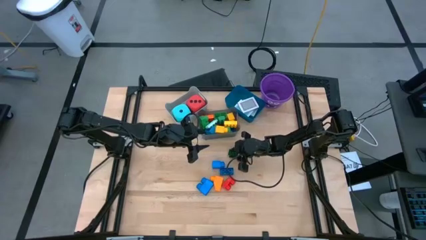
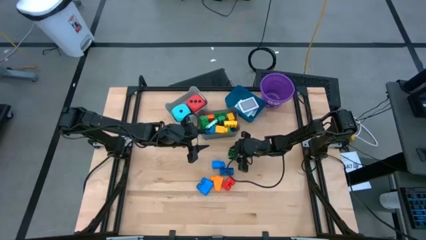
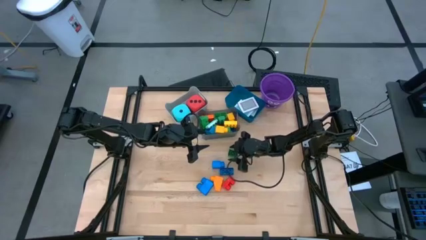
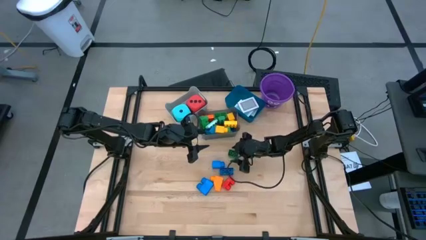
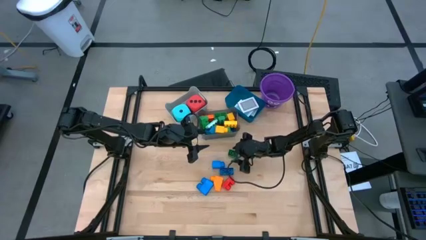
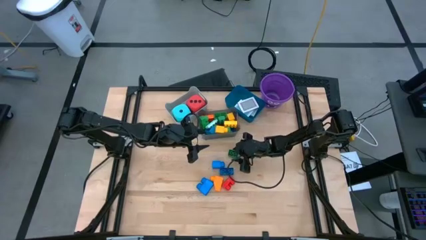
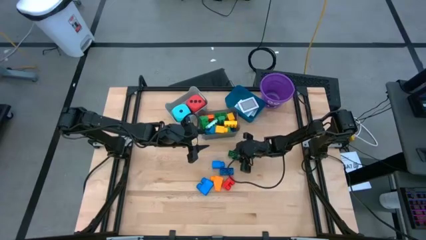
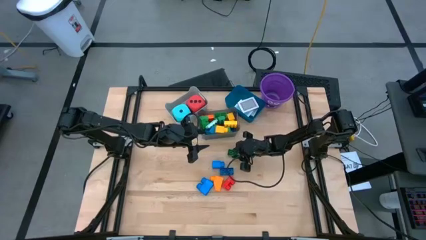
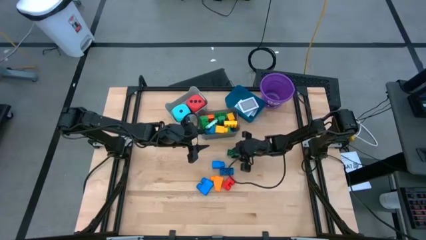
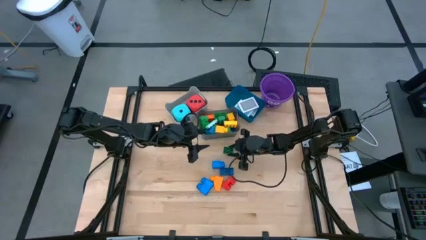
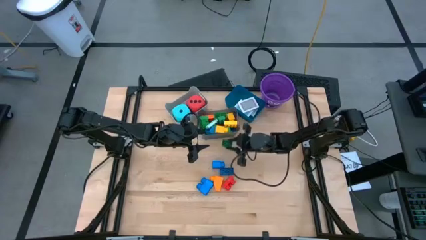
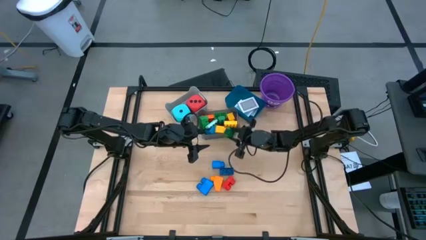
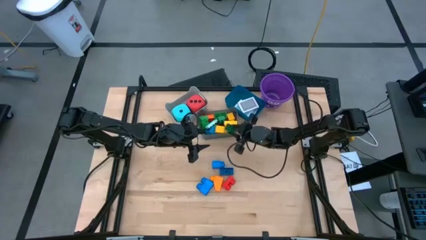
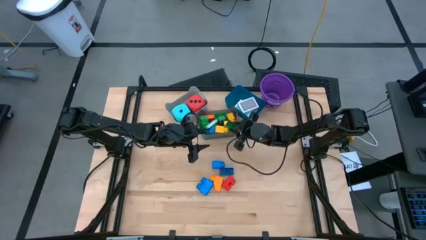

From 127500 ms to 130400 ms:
Task: Pick & Place Toys
Put the green block into the black bin

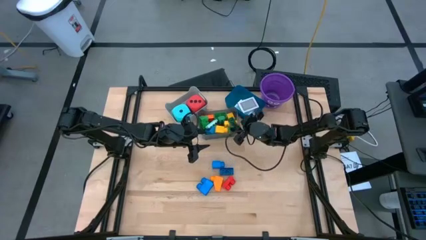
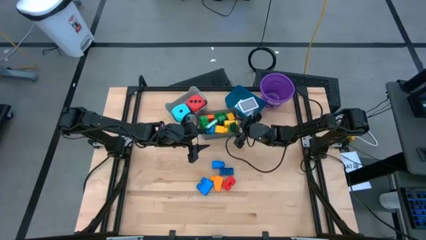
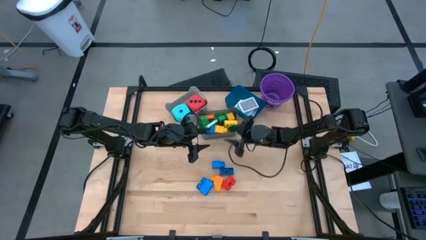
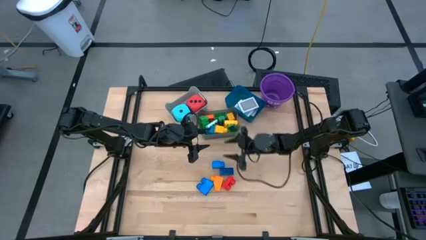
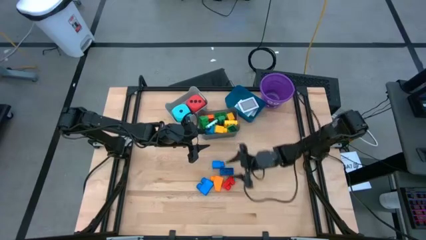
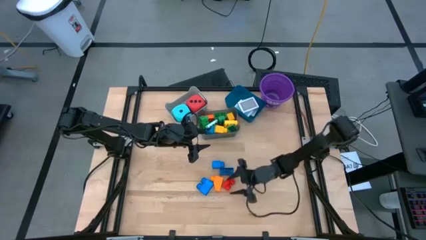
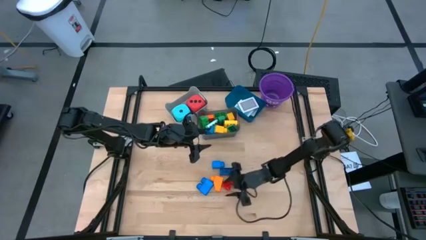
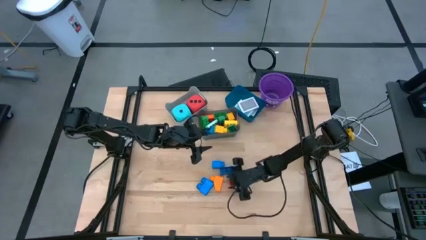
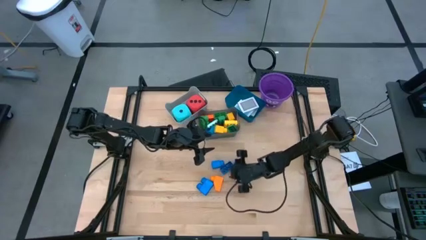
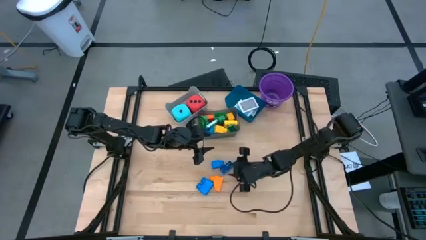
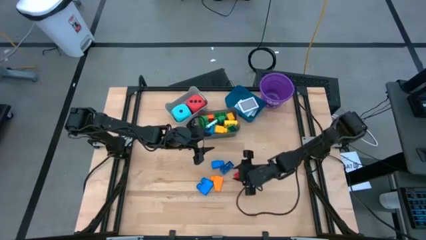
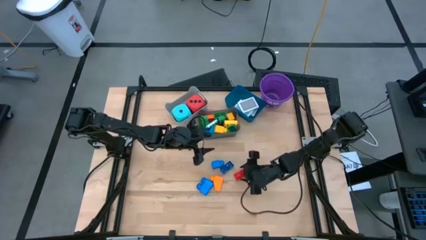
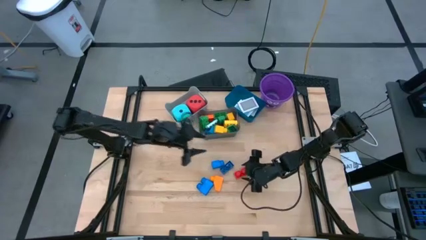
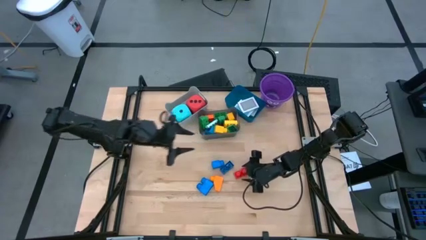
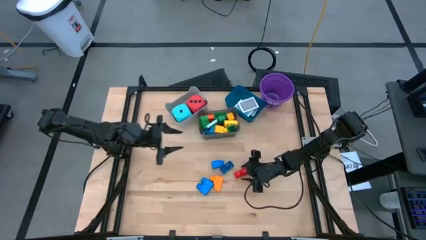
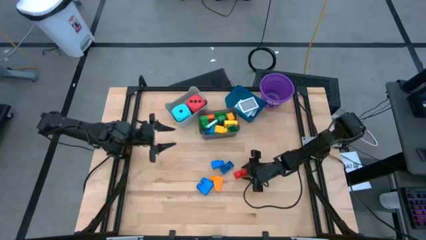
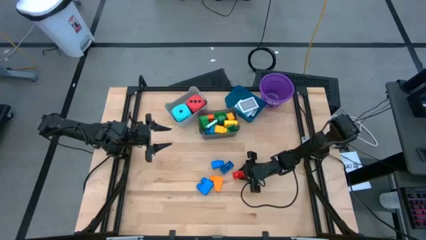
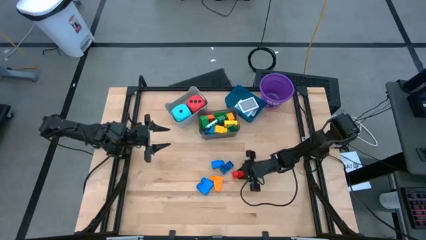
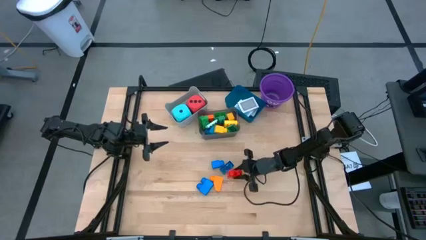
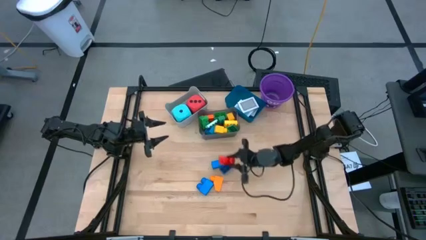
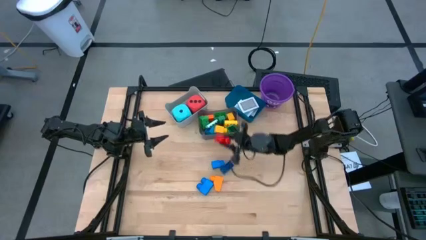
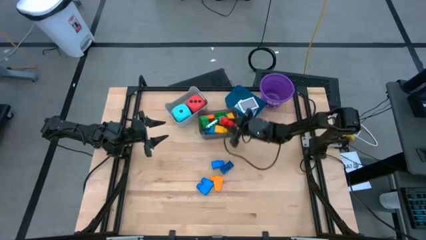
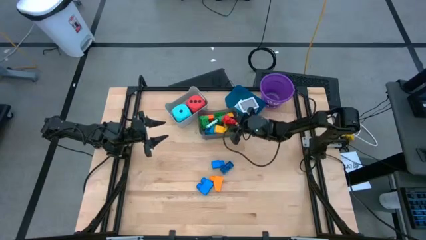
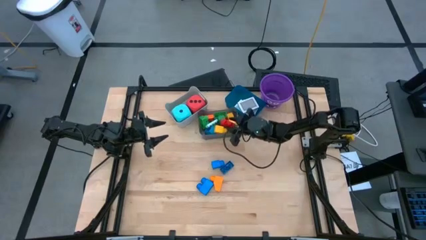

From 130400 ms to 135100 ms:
Put the red block into the black bin

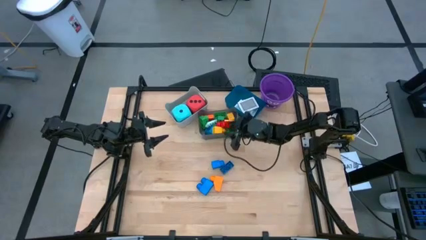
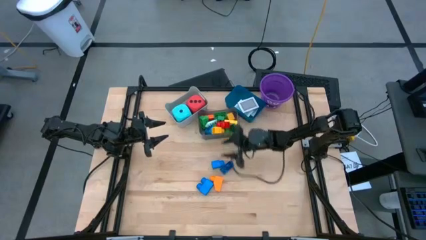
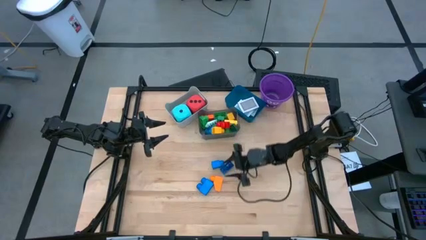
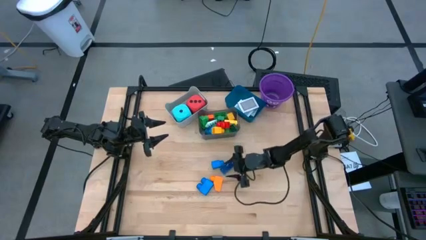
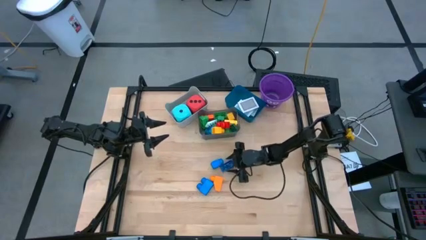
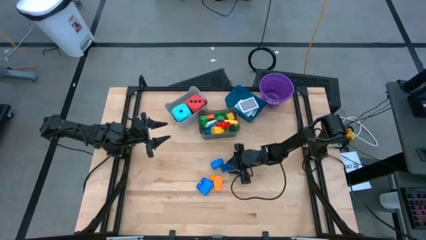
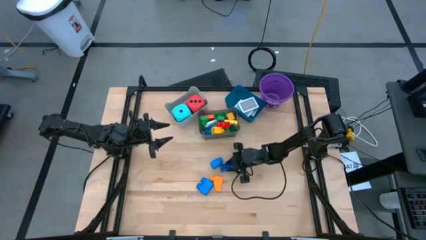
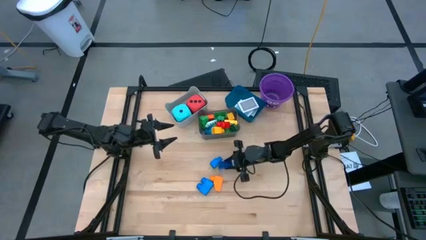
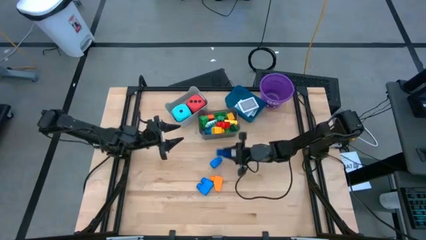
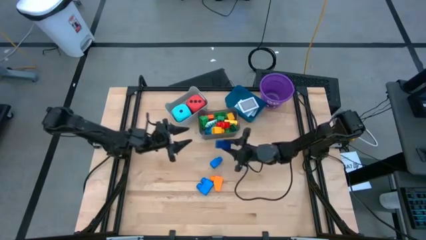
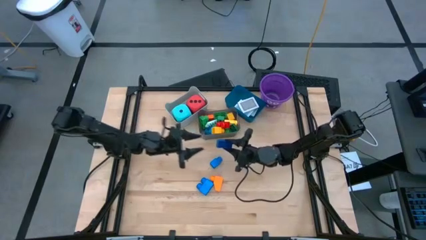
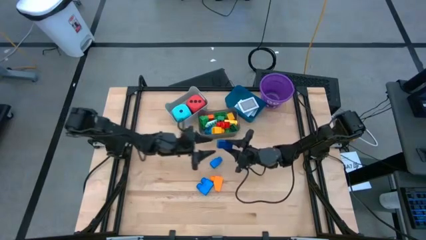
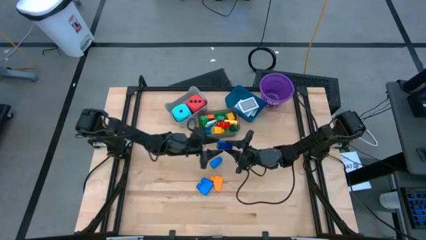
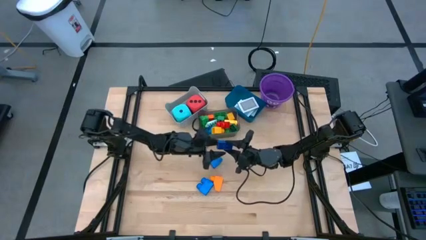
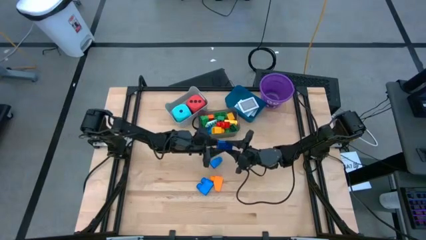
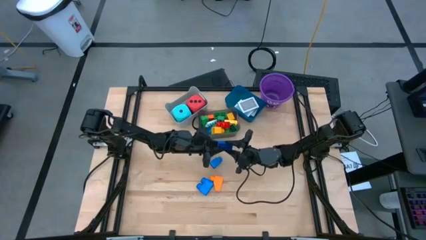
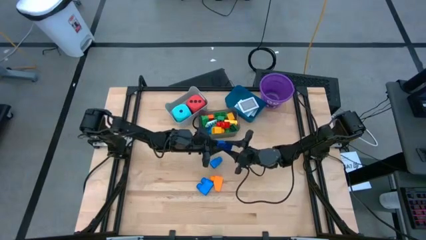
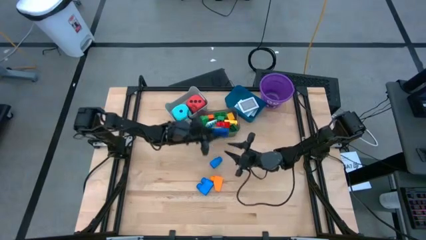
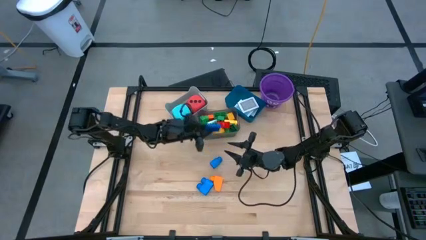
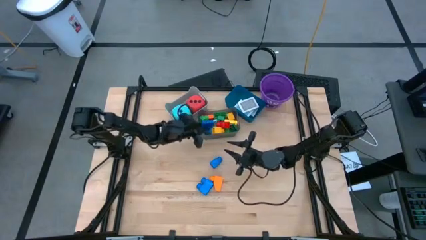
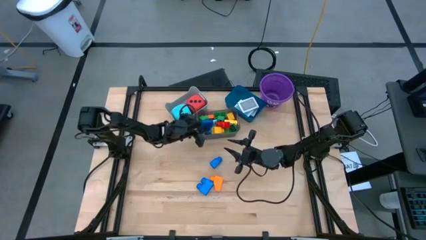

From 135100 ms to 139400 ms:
Put the dark blue block into the black bin

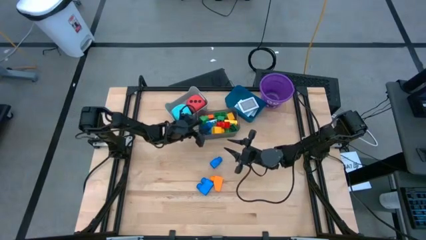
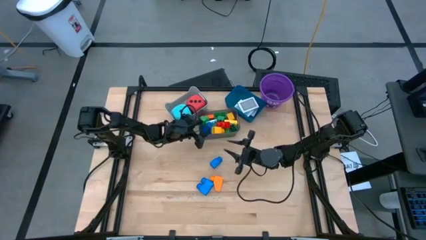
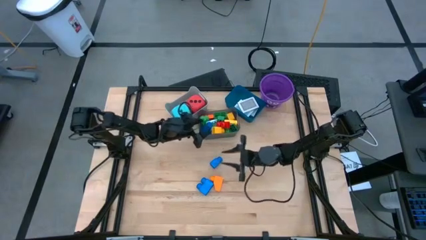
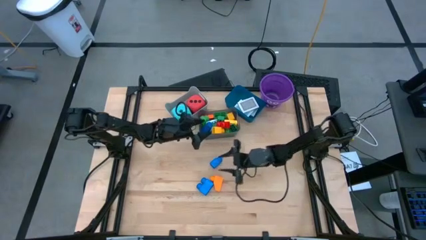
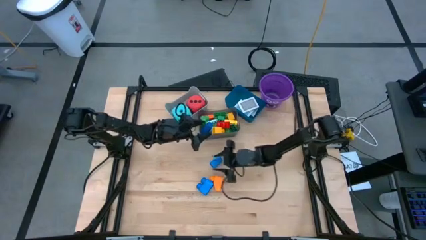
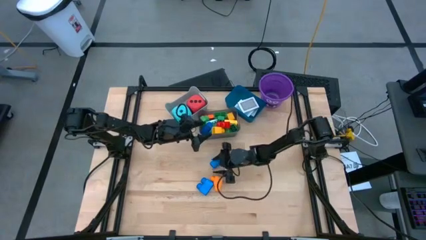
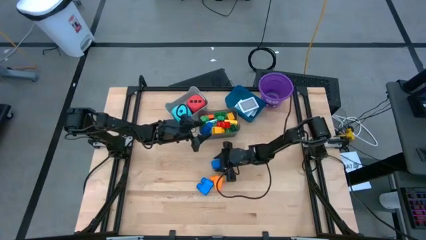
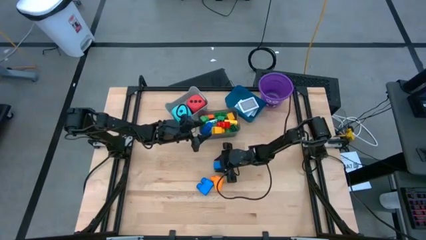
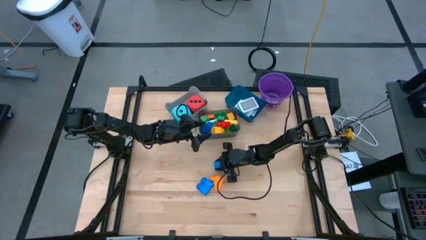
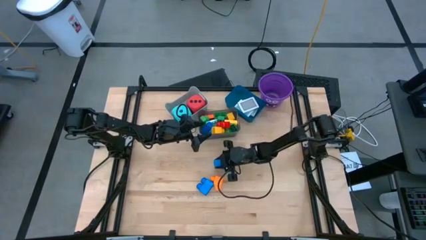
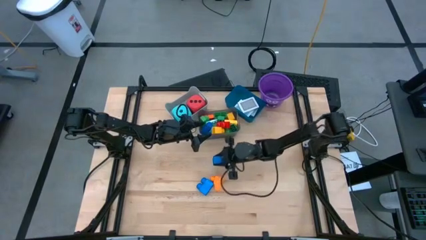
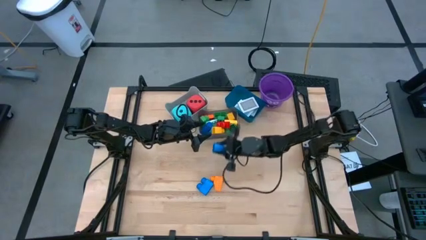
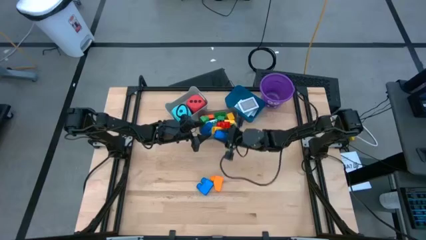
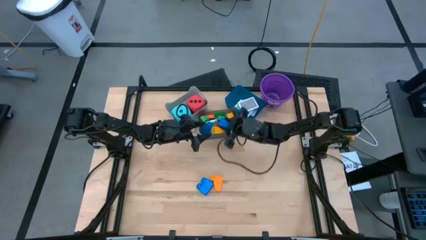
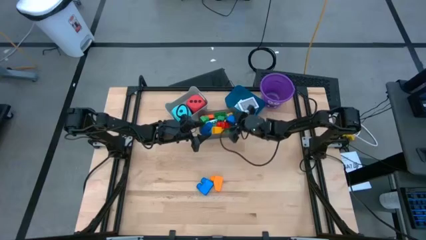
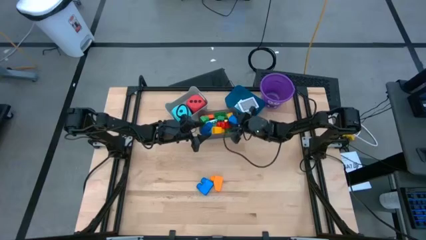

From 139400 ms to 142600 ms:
Put the light blue block into the black bin

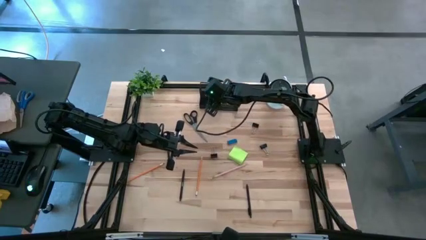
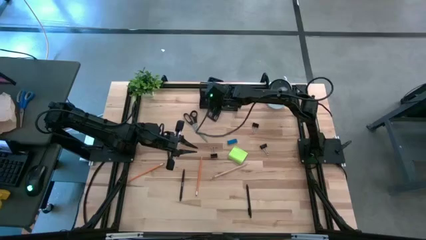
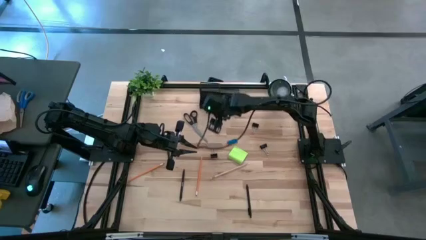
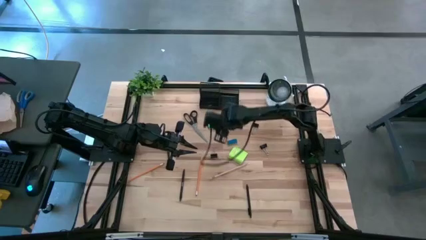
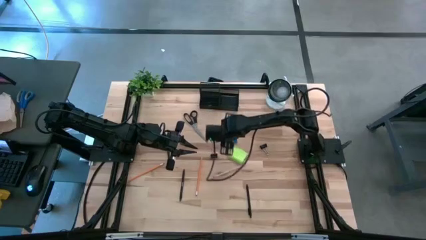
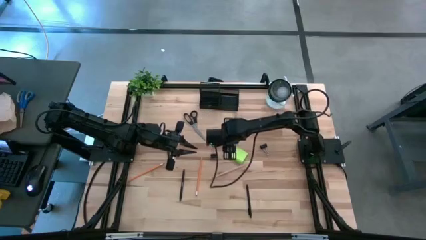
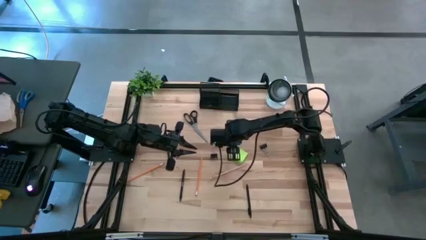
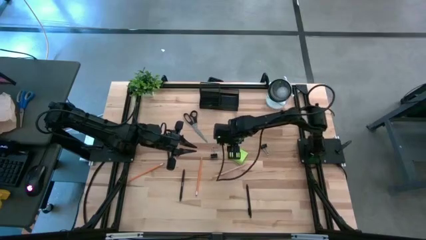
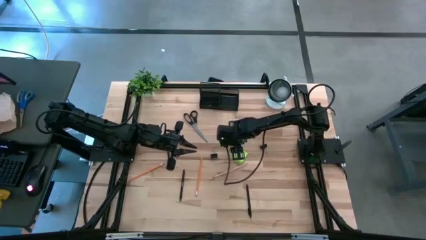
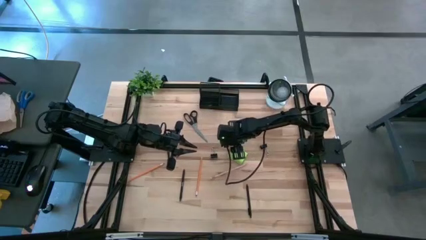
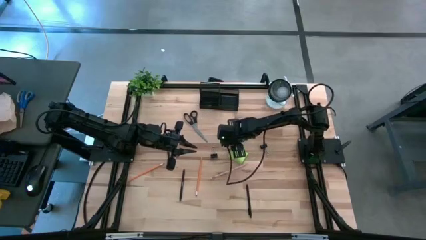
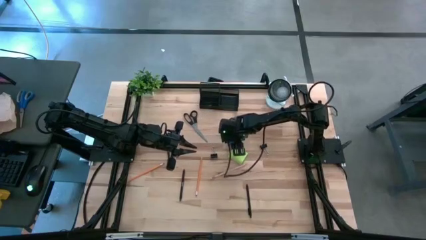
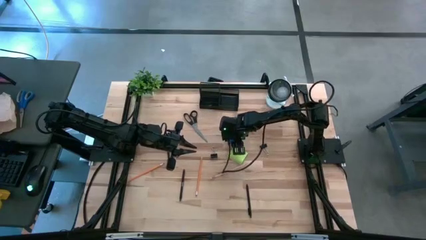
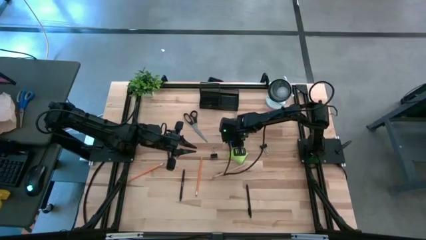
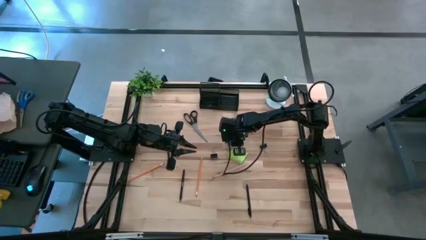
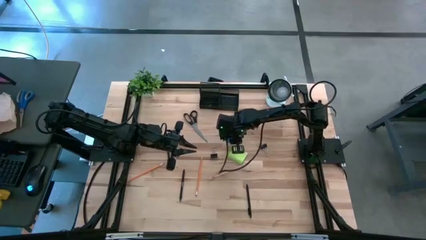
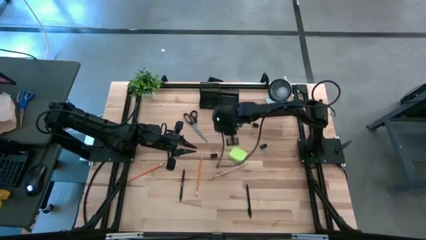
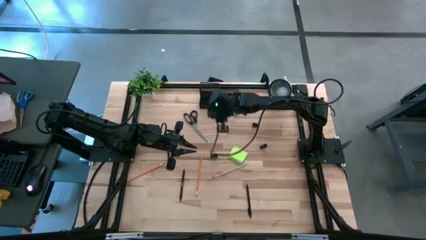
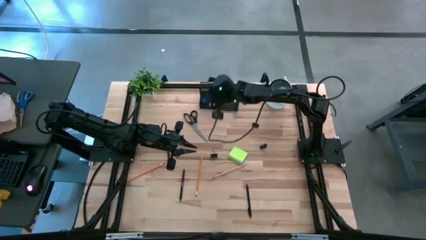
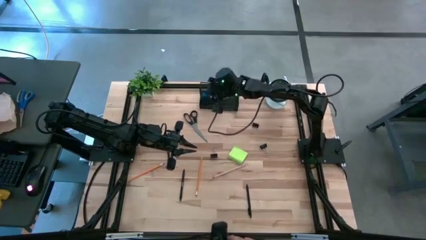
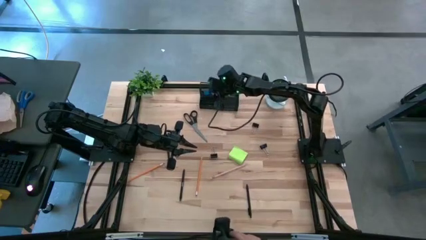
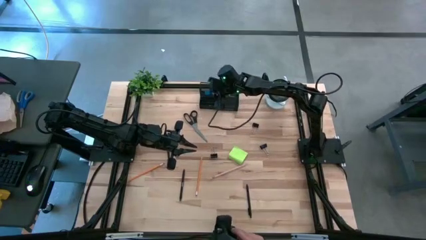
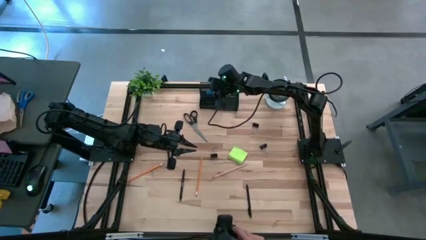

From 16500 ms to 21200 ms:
Task: Pick and place office supplies into organizer
Put the blue eraser into the black desk organizer
